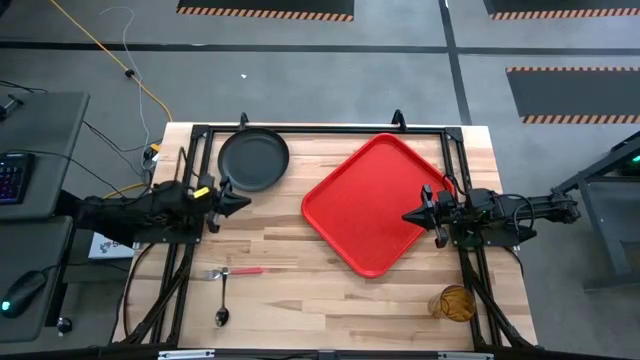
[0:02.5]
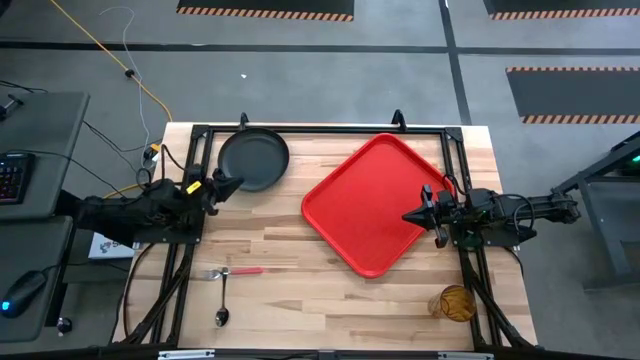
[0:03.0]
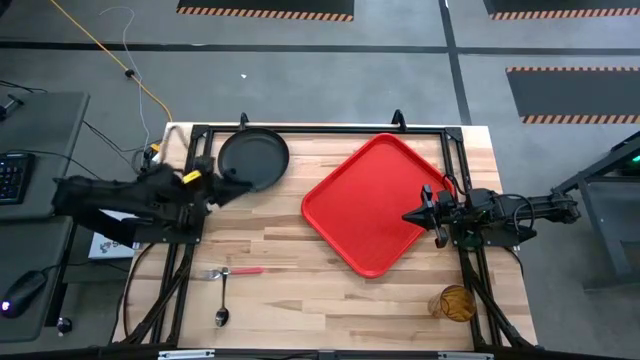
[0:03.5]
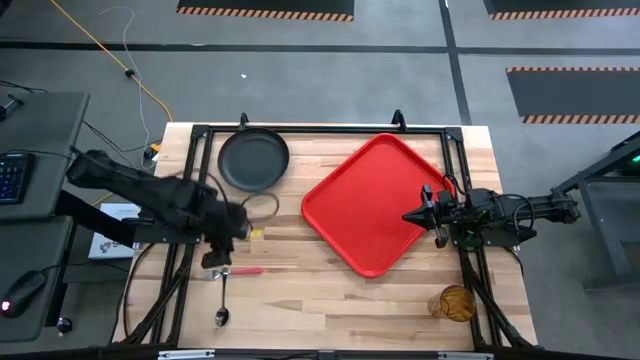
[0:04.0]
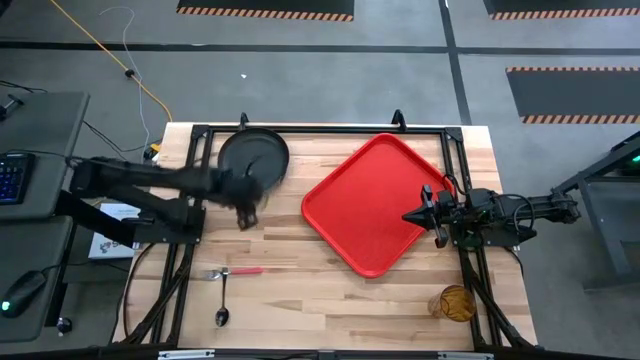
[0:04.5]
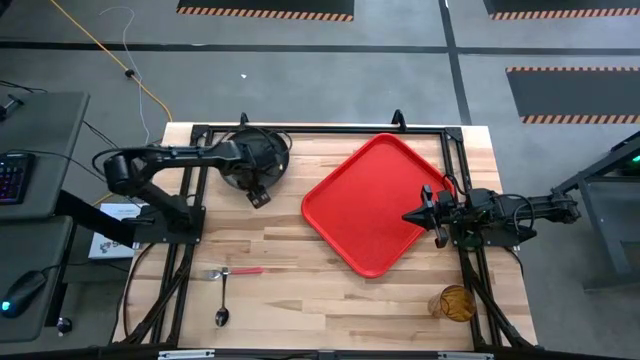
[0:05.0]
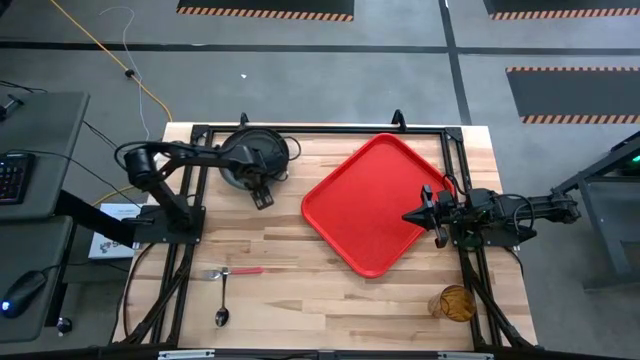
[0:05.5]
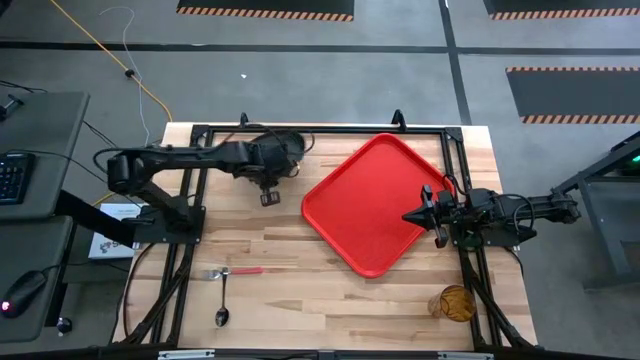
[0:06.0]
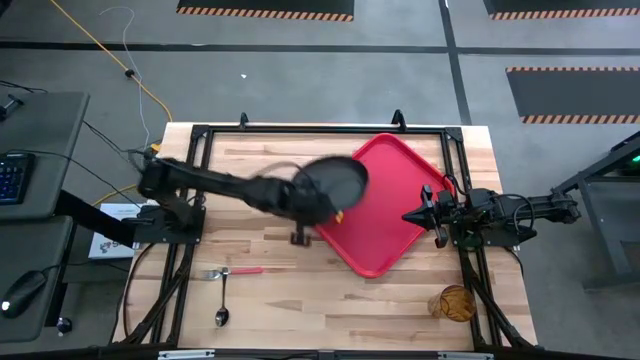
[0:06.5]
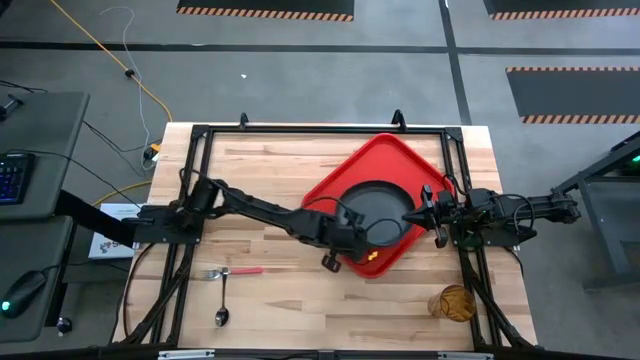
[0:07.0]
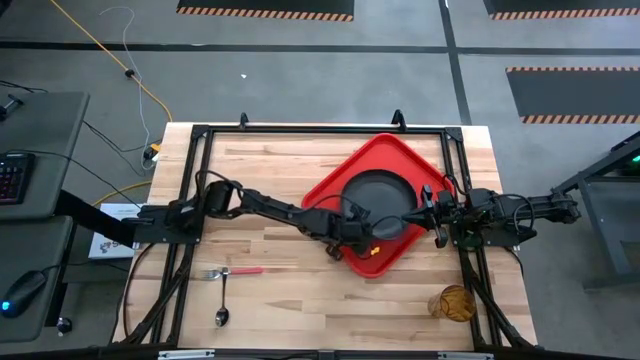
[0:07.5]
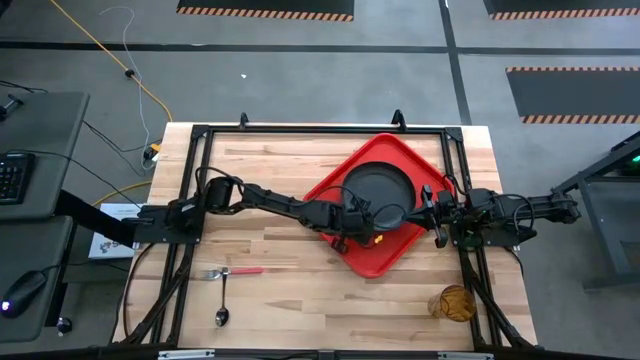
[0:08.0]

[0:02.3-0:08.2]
Task: Pick and place plate/cup/fork/spoon on tray
Put the black plate on the red serving tray

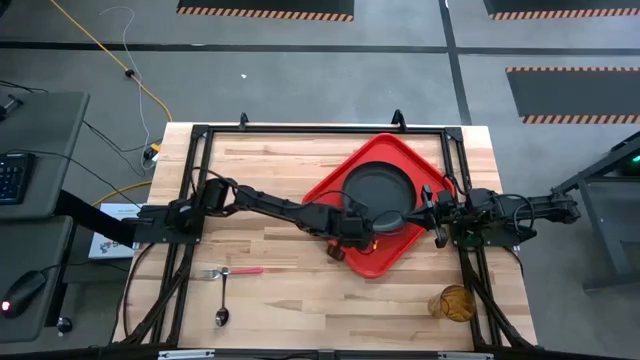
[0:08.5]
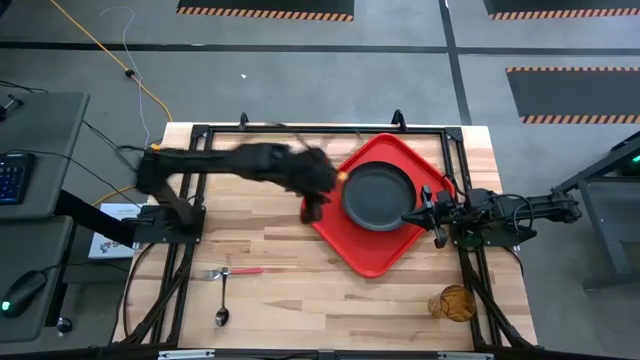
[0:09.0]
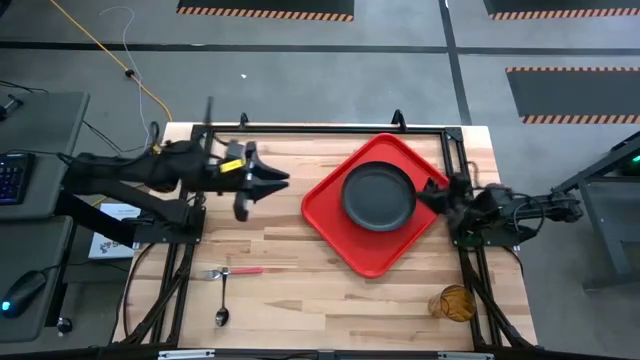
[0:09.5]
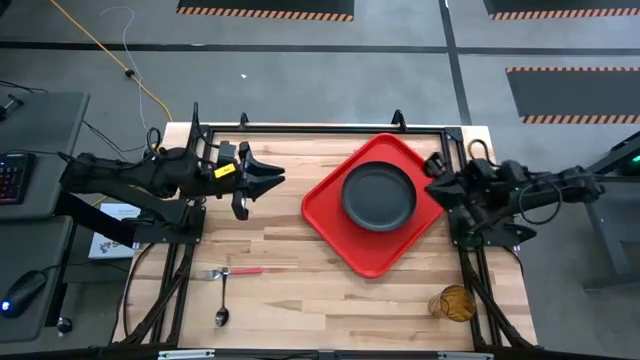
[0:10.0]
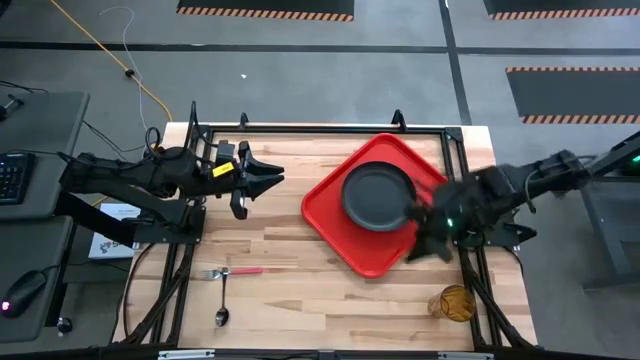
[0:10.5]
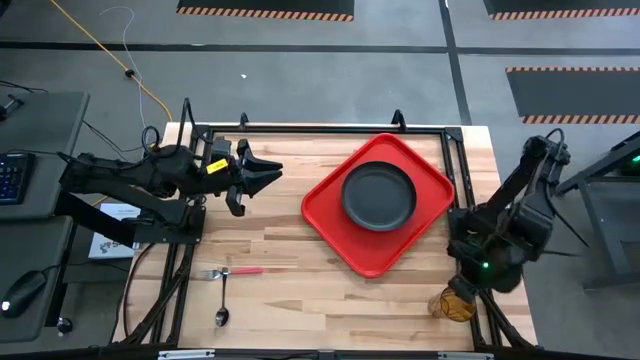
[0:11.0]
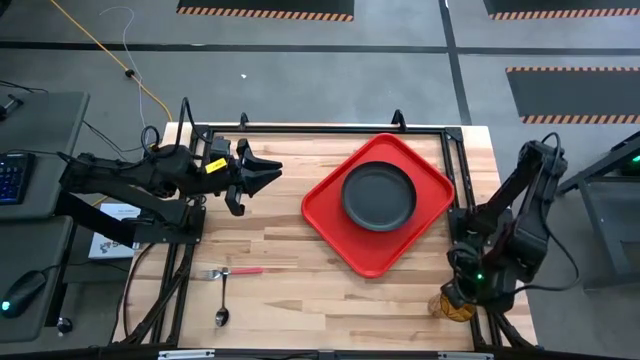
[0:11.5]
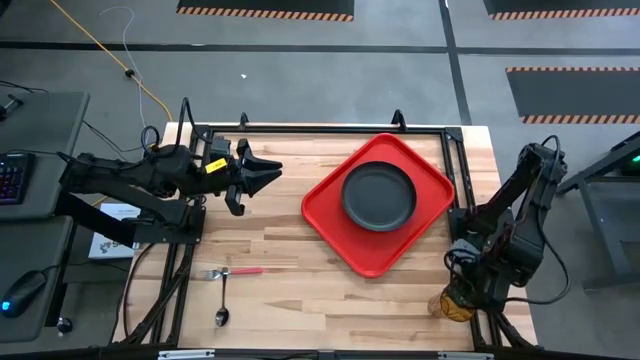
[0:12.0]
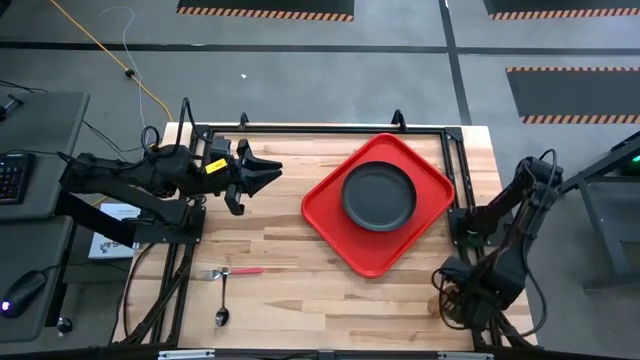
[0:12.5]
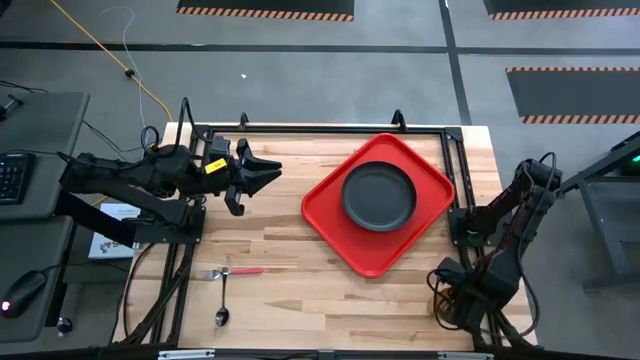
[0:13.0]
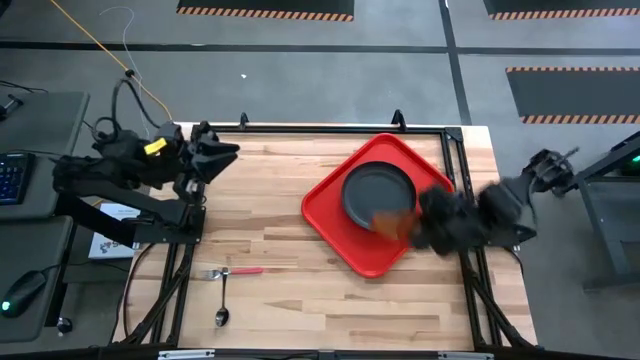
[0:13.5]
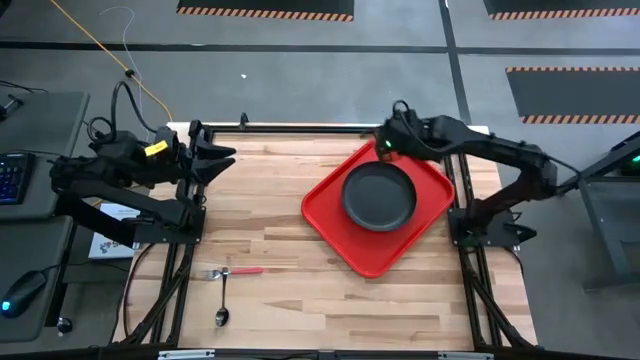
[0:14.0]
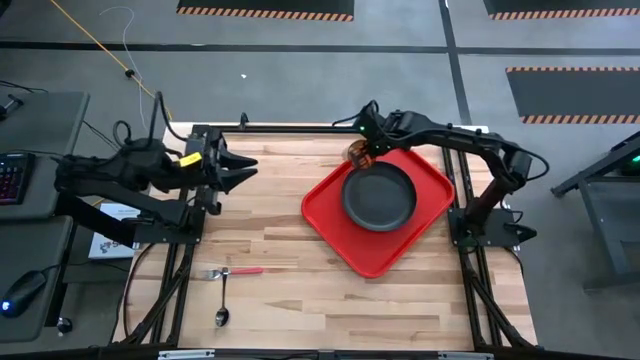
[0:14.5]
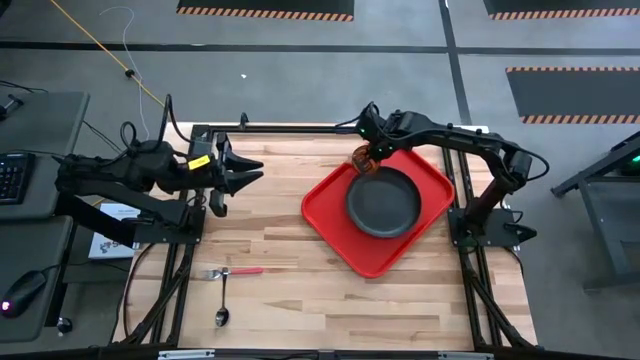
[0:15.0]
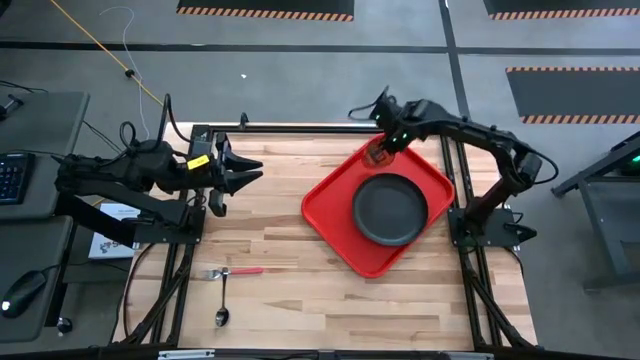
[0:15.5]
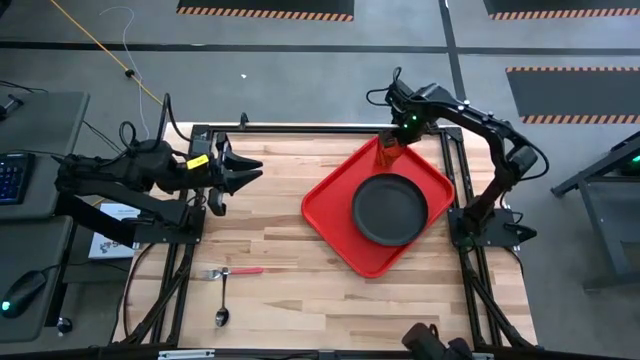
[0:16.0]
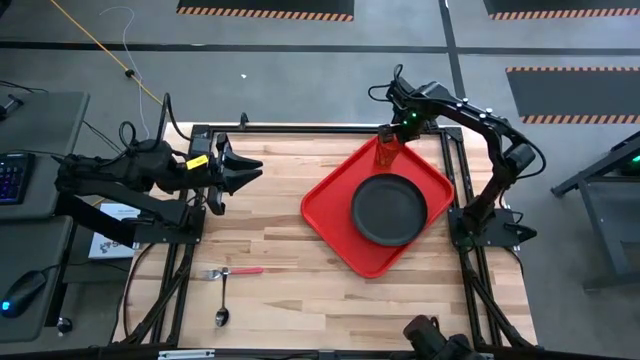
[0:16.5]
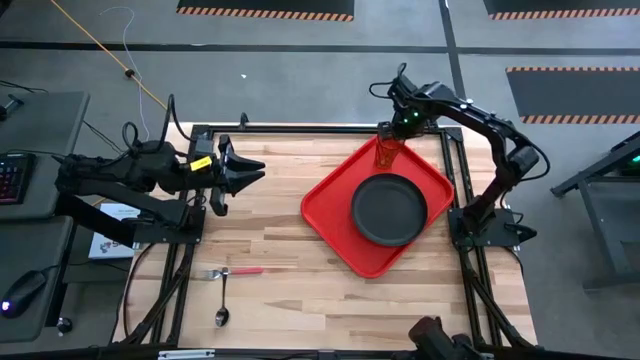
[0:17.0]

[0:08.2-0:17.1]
Put the yellow cup on the red serving tray to the top right of the plate

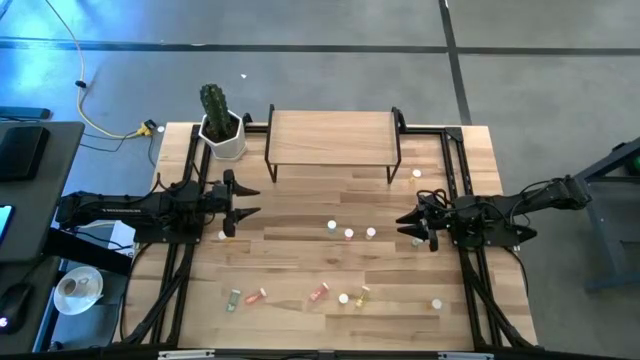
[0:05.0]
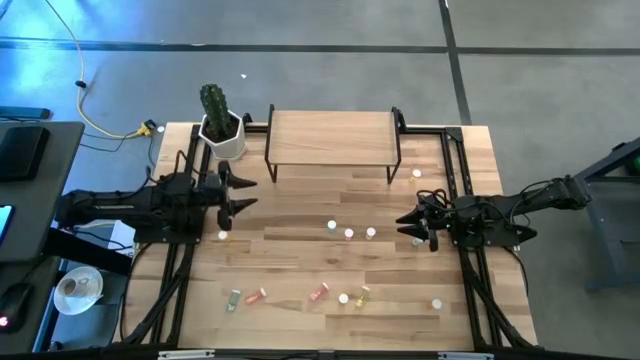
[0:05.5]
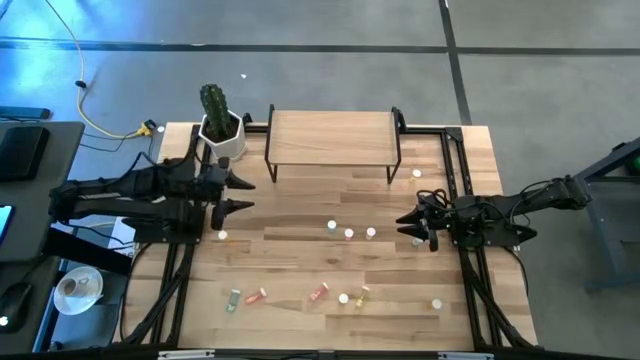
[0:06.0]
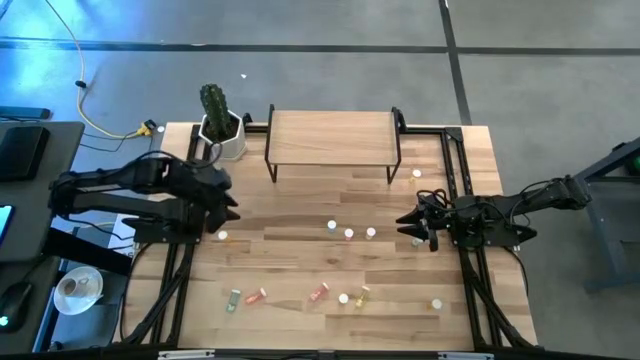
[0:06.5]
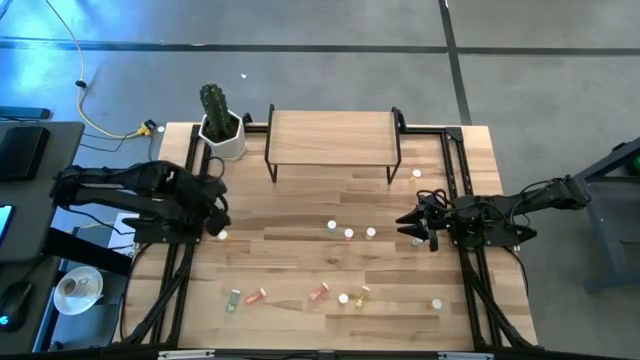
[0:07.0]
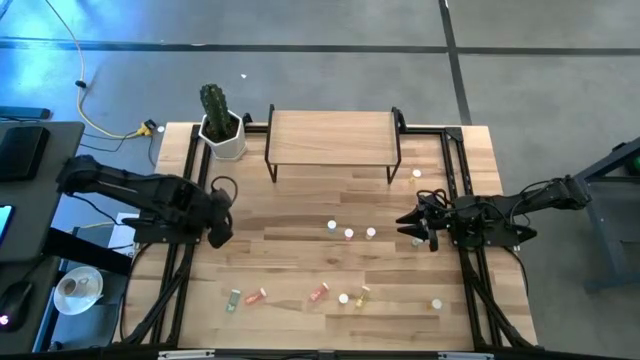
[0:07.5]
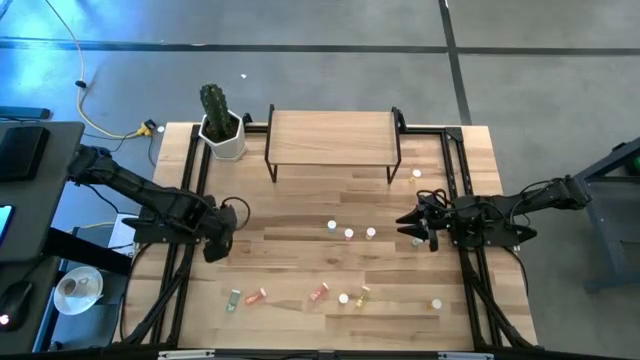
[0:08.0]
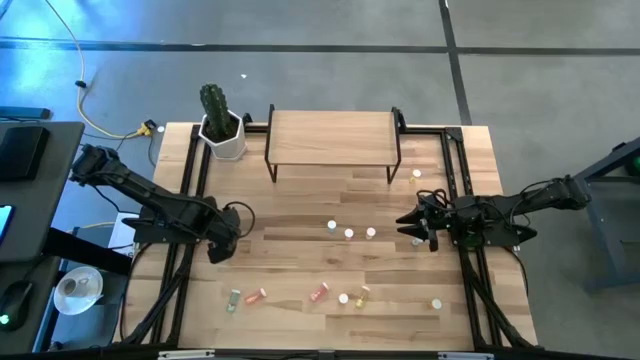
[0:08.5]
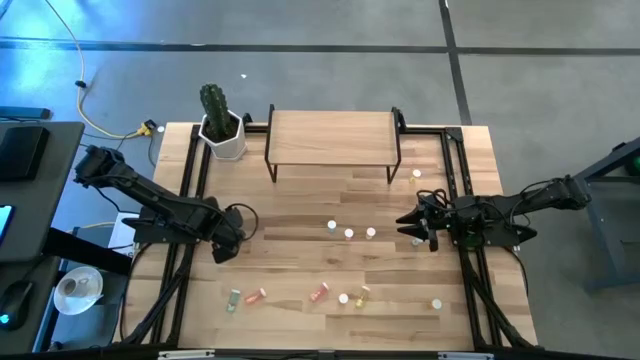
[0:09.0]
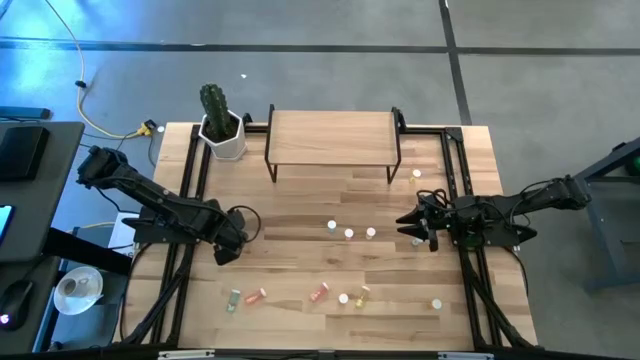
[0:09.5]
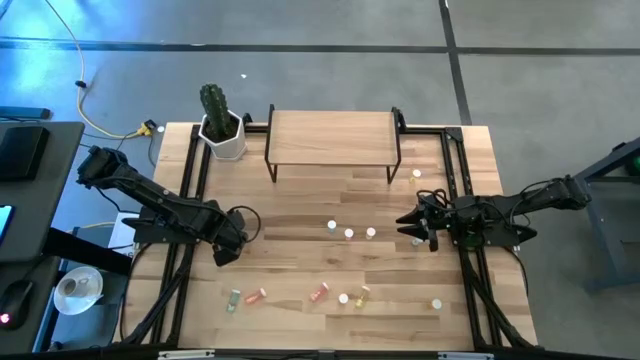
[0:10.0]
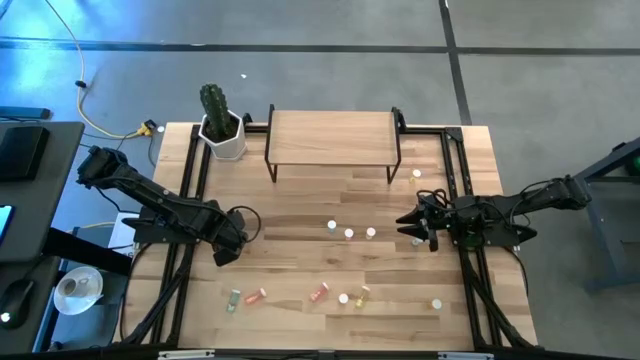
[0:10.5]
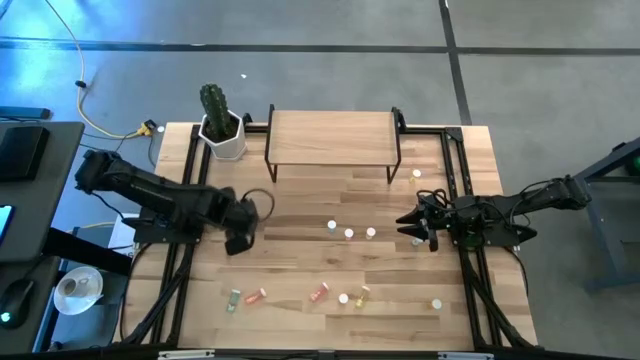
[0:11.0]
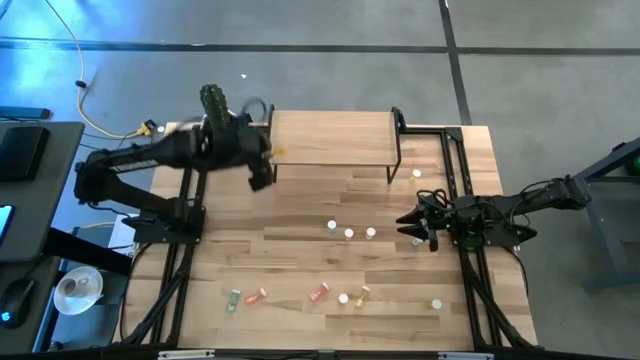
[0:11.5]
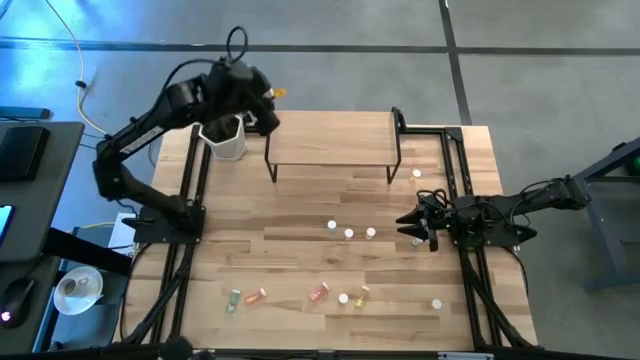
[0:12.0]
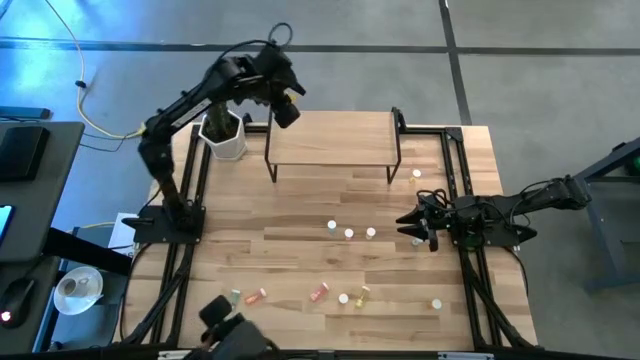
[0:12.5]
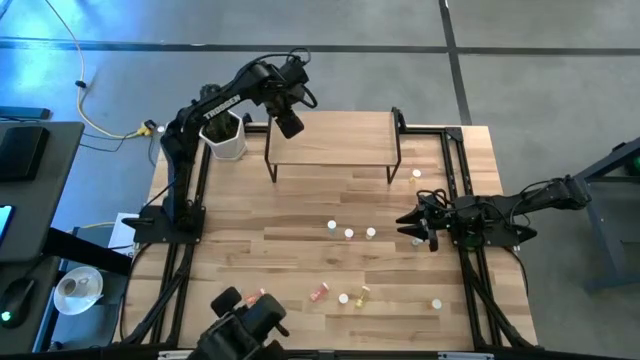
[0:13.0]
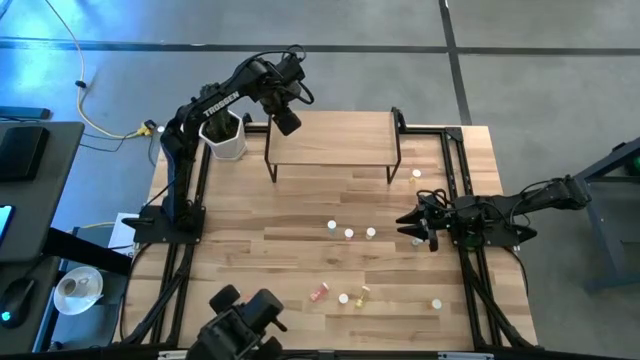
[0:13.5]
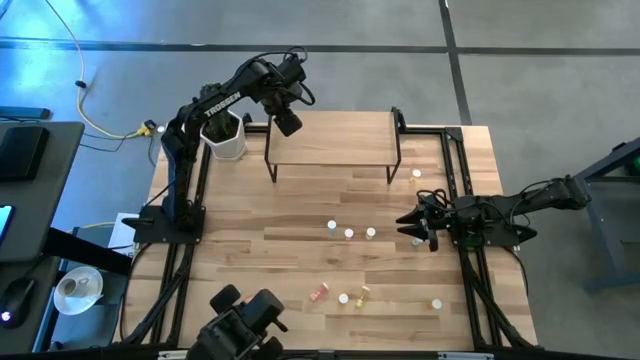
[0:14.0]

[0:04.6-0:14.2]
Task: Pick and place medicine bottles onto shelf by color
Put the top orange pill bottle on the shelf
